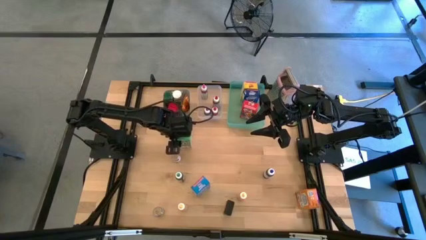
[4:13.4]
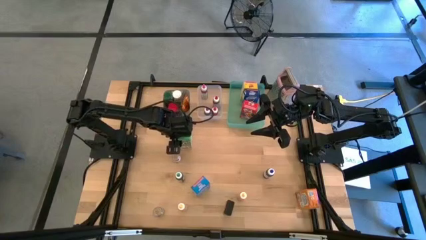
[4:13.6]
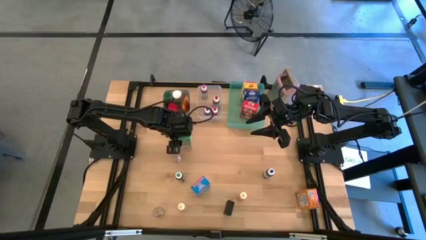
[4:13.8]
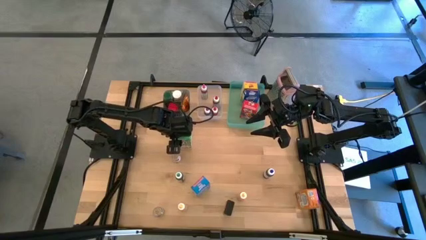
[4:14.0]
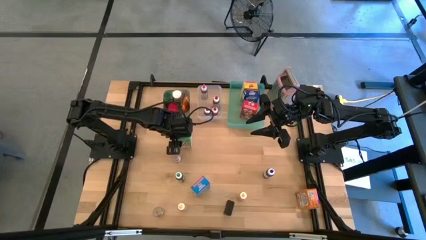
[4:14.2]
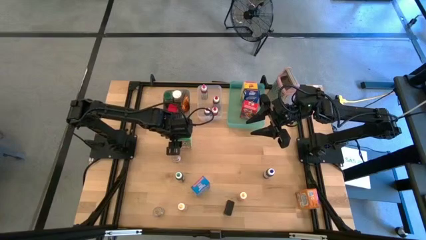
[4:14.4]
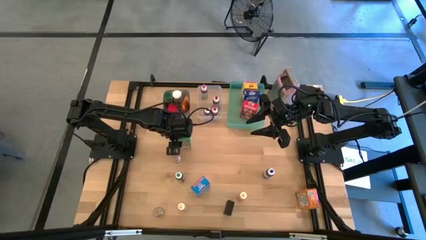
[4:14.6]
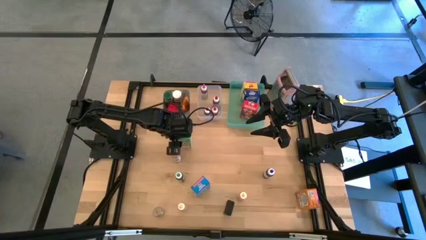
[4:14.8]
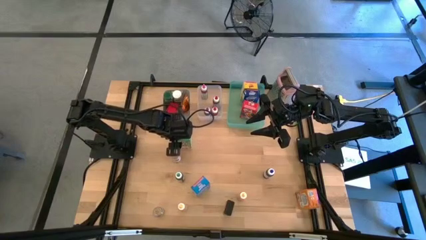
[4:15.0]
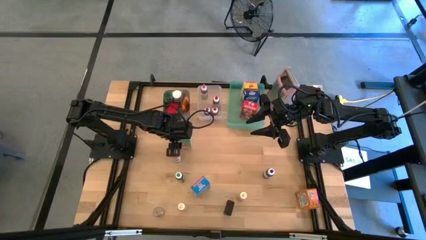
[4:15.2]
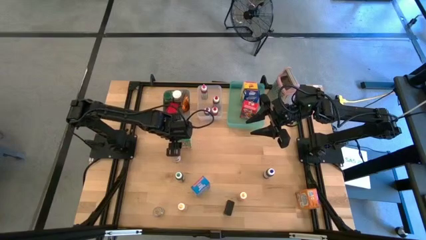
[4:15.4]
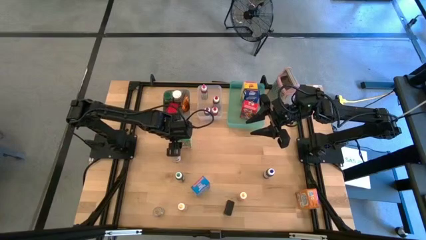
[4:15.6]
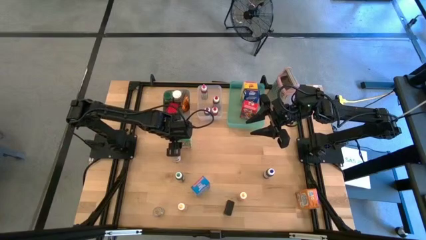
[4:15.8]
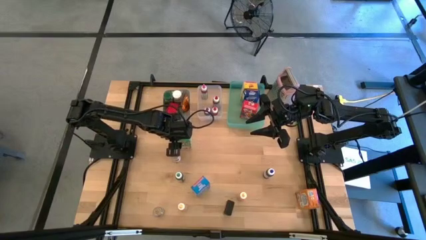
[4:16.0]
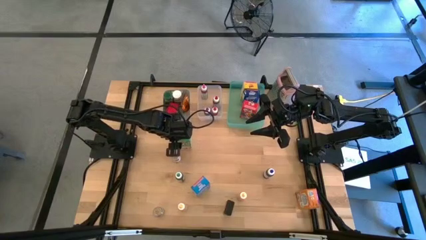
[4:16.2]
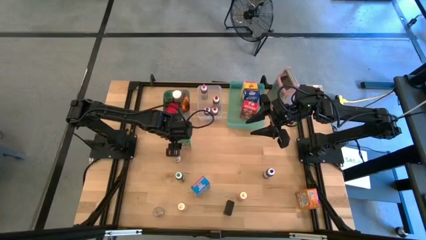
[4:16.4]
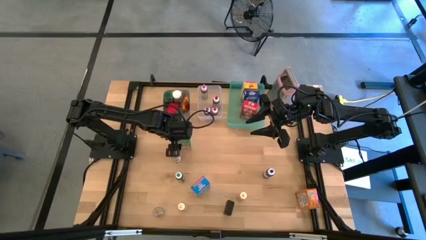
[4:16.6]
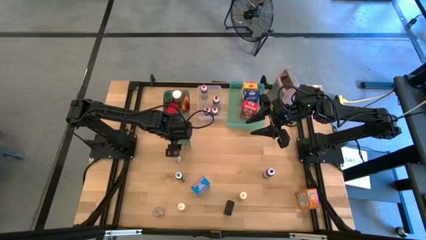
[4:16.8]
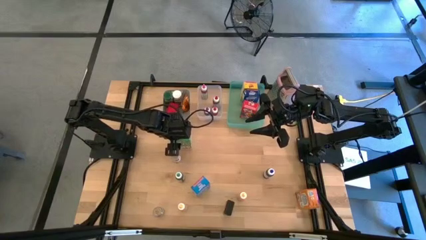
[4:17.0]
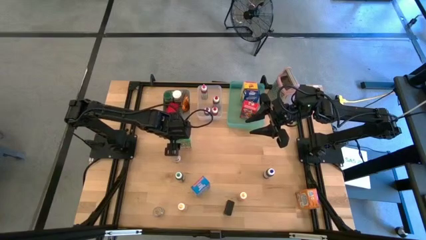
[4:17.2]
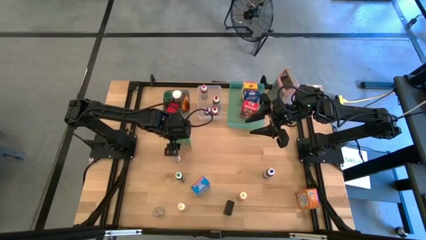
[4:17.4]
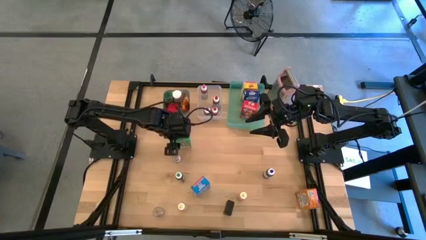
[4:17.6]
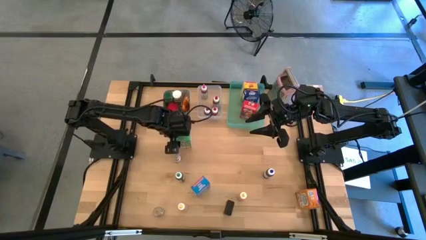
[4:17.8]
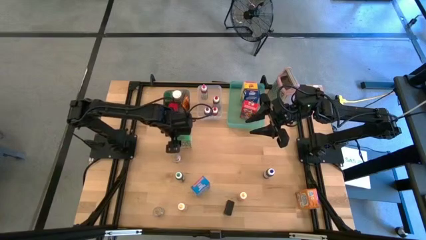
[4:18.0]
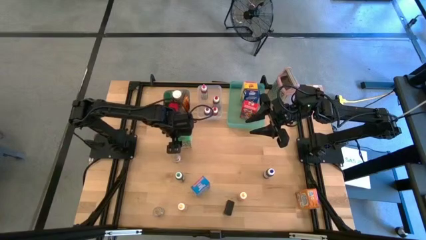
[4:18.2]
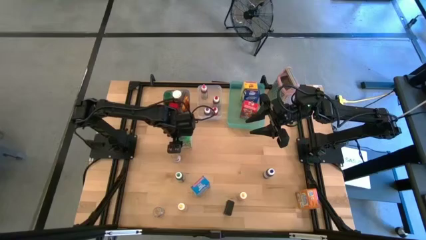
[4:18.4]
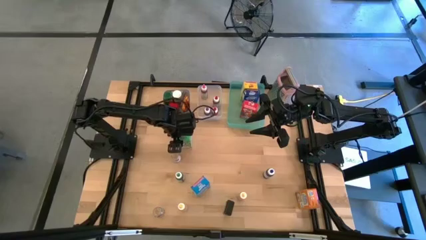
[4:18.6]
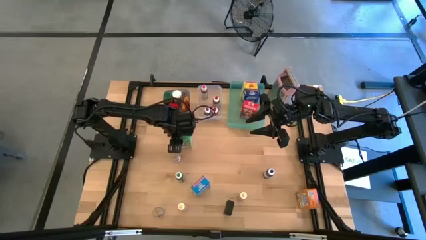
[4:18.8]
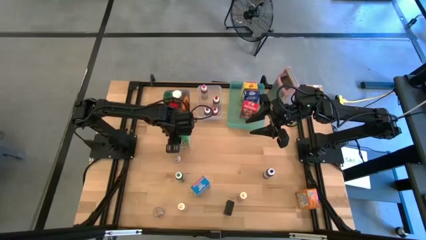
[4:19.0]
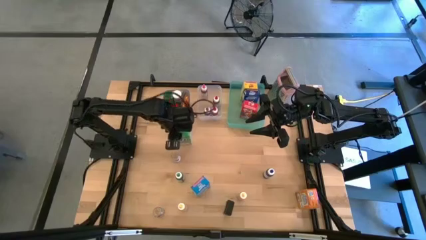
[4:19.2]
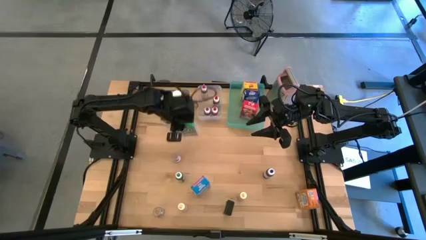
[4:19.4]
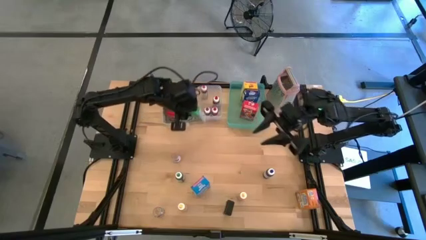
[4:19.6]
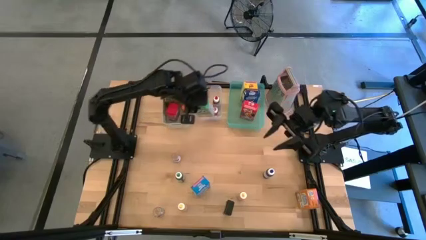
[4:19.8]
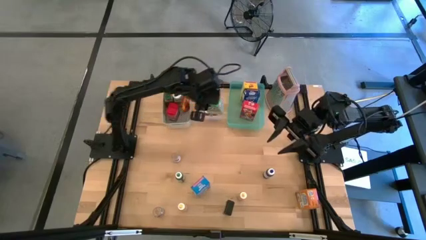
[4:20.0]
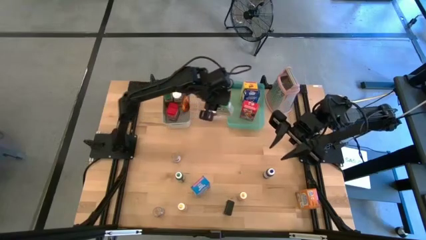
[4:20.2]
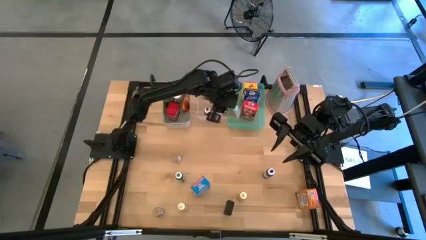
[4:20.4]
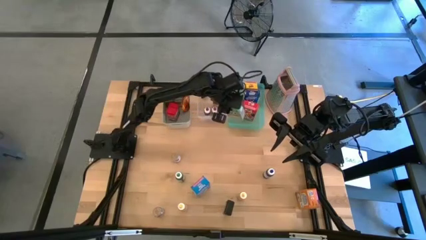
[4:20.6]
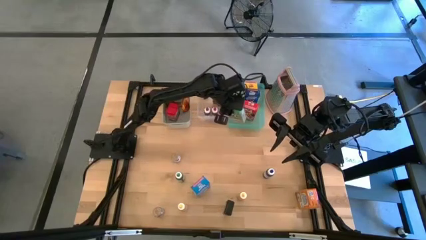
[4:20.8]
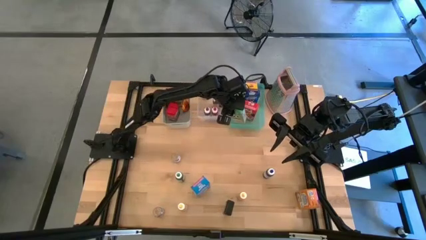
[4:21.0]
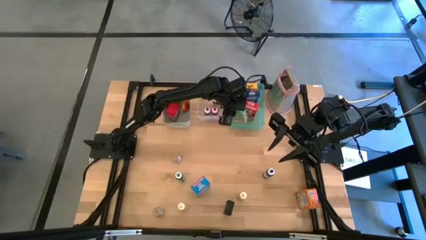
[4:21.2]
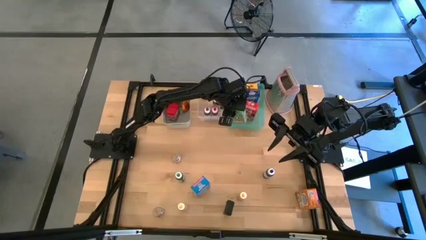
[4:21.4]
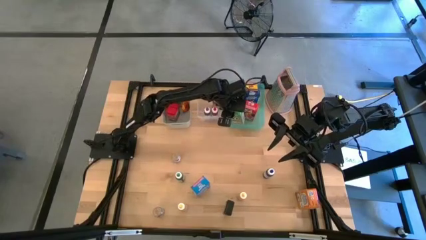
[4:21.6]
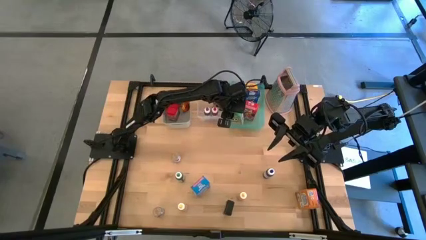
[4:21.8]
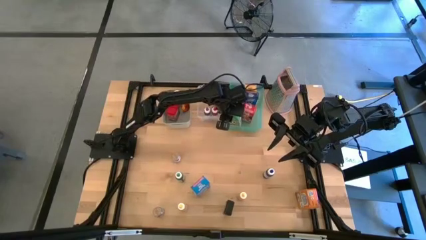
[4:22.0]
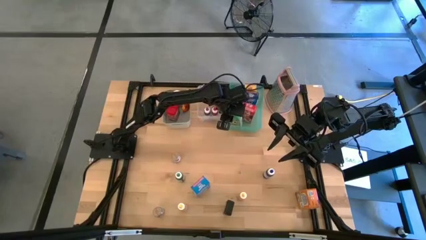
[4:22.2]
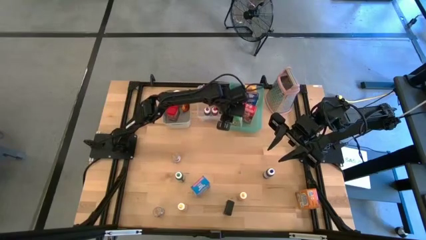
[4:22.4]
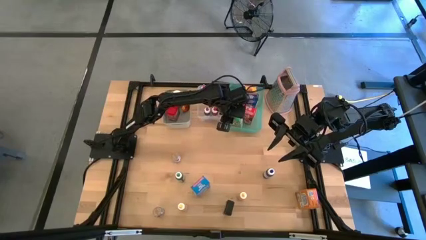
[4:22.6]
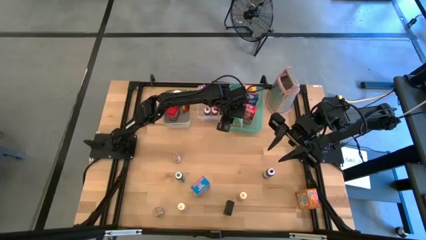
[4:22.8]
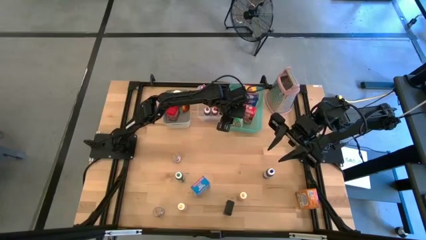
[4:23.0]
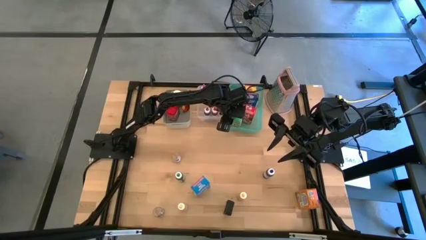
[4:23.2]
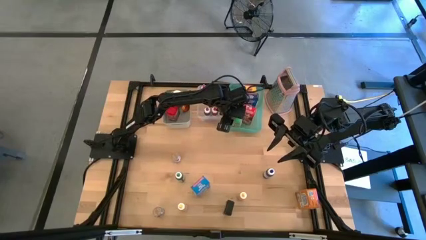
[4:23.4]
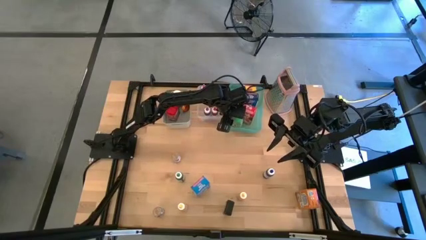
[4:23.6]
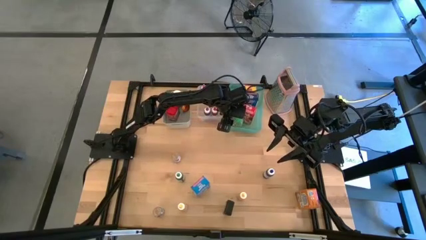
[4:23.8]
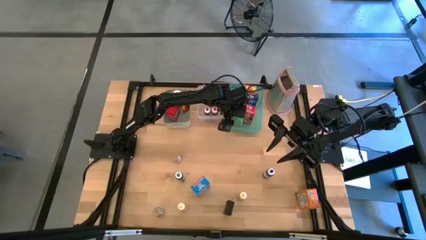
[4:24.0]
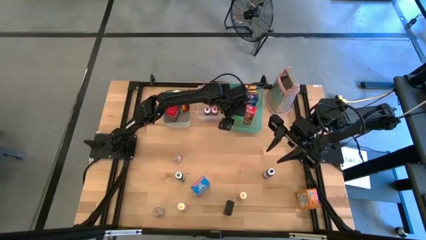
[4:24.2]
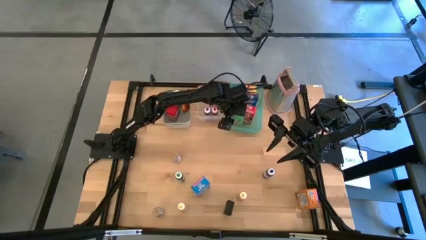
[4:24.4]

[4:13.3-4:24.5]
Task: Pick & Place Kitchen Items
Put the green cereal box into the green bin
